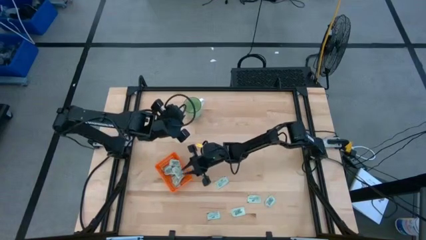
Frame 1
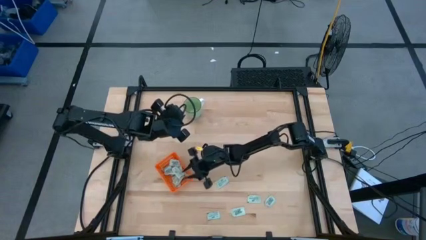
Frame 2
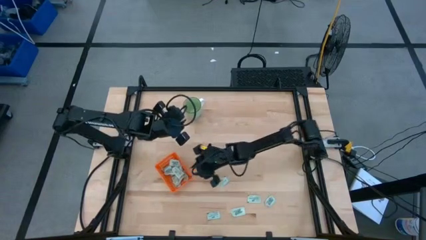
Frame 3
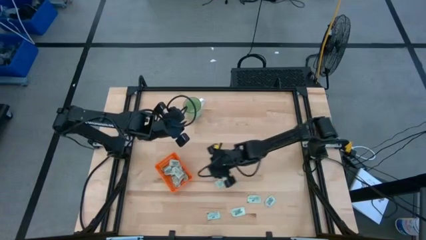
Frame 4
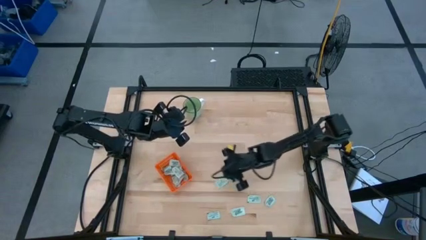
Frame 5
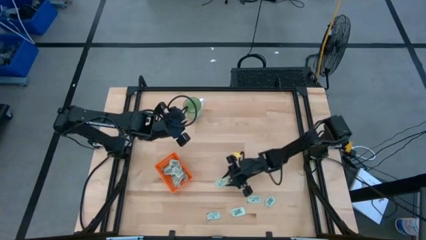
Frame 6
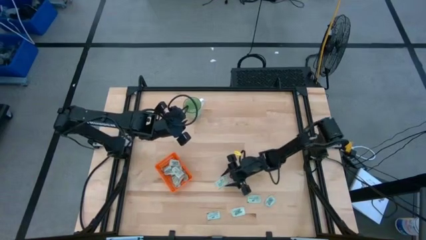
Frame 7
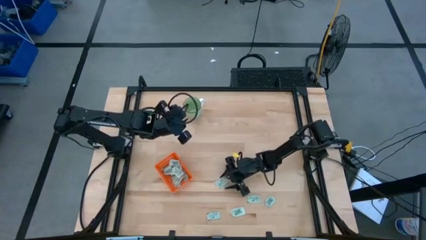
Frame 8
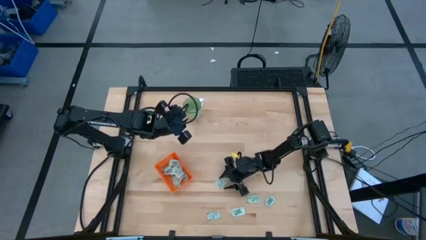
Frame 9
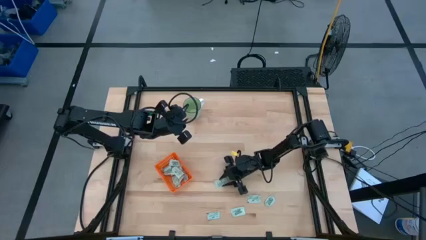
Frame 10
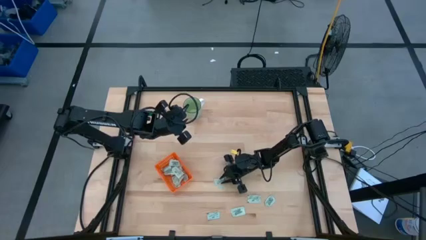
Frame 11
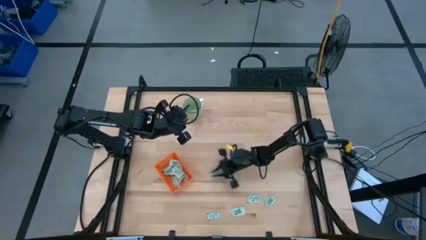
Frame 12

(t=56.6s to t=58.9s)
Task: Pick and place Stevia / Truvia into bins
Put the stevia packet into the orange basket

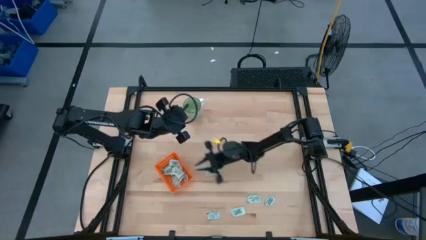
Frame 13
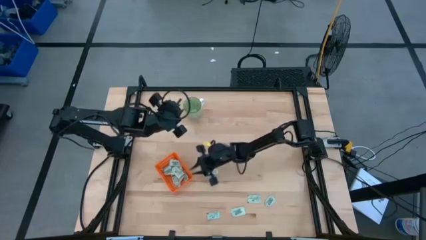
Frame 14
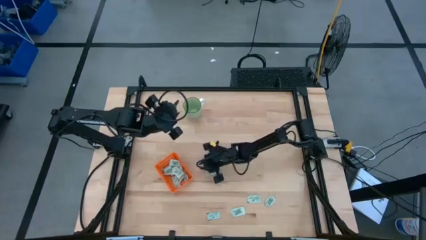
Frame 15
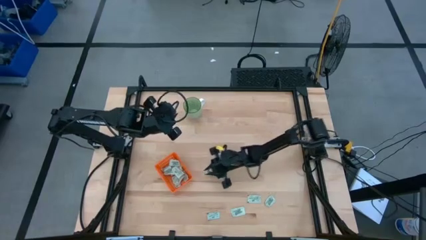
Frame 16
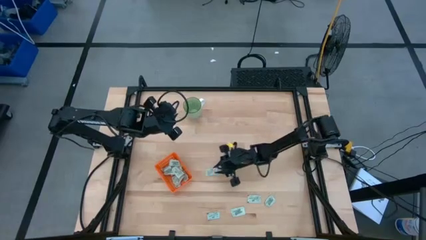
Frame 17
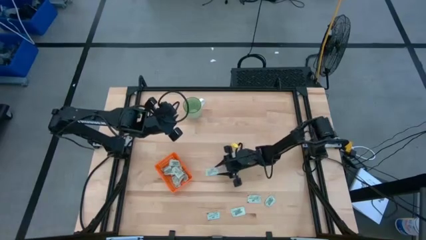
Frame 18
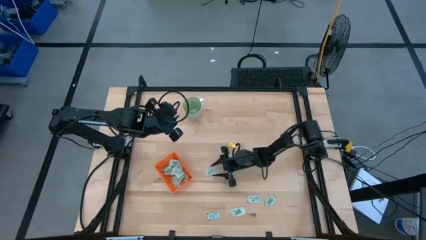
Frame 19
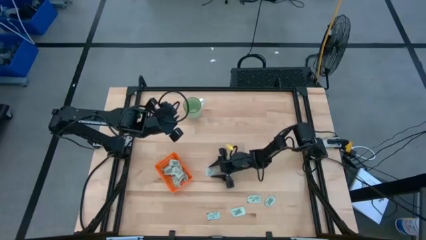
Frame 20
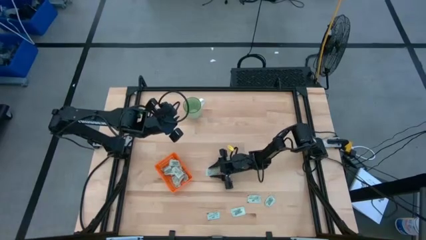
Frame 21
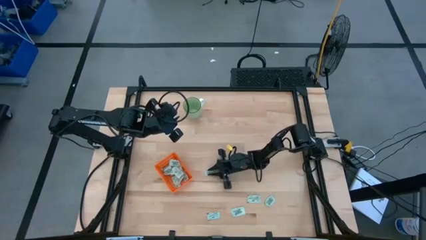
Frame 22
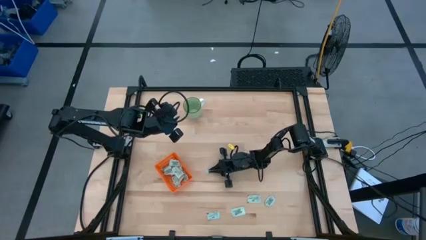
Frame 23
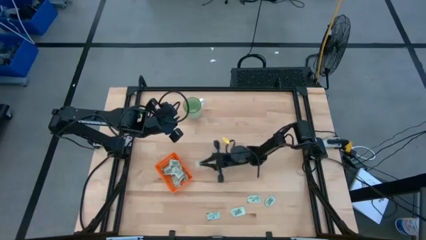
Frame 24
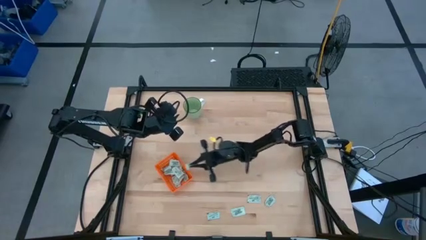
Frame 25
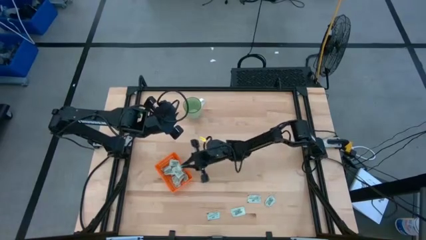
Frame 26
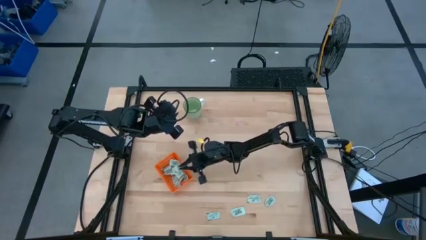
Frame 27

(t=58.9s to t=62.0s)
Put the stevia packet into the orange basket

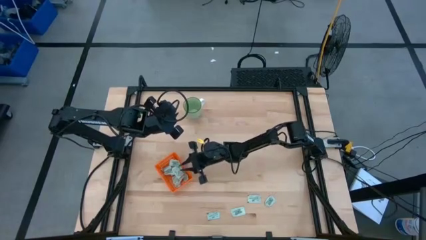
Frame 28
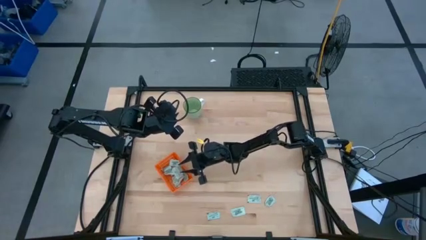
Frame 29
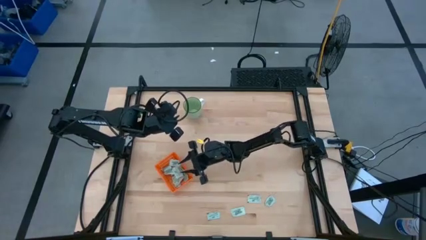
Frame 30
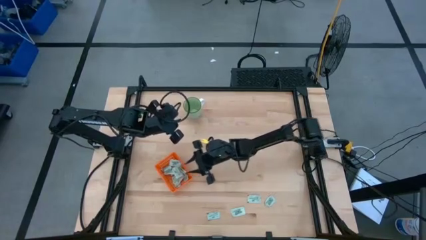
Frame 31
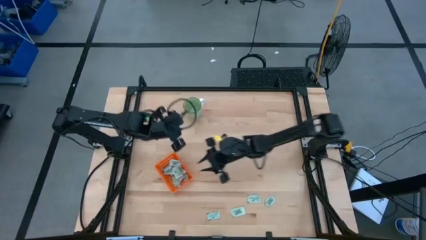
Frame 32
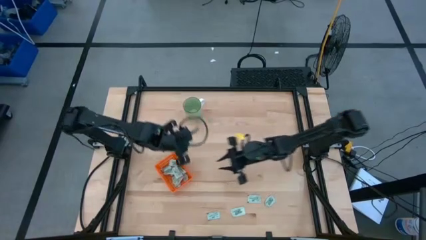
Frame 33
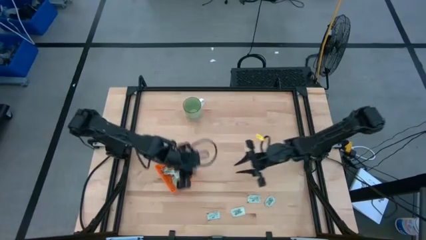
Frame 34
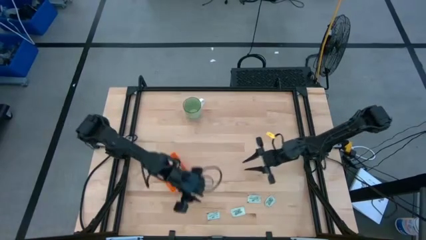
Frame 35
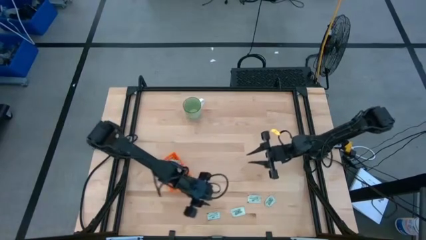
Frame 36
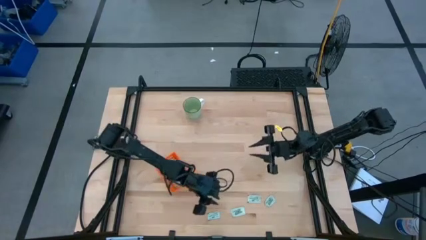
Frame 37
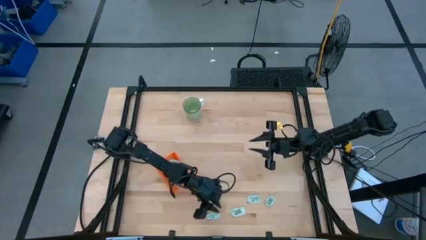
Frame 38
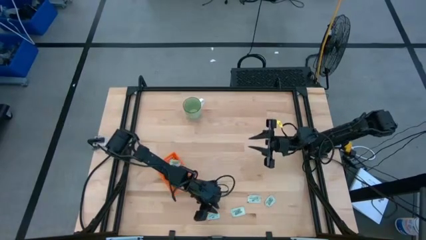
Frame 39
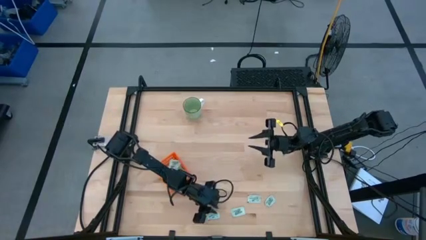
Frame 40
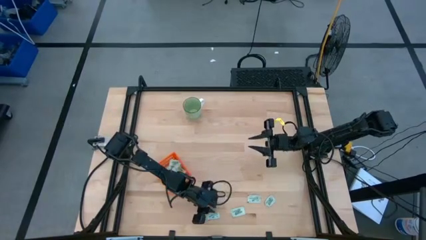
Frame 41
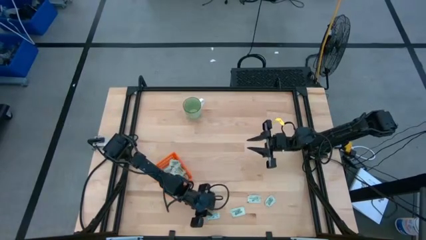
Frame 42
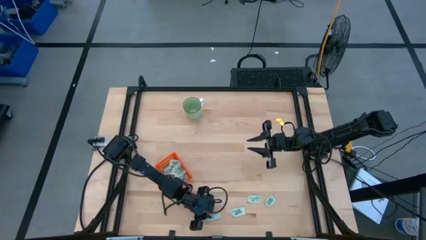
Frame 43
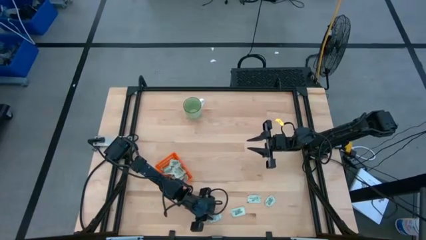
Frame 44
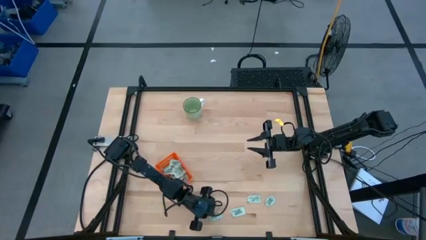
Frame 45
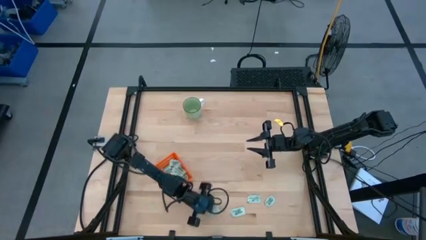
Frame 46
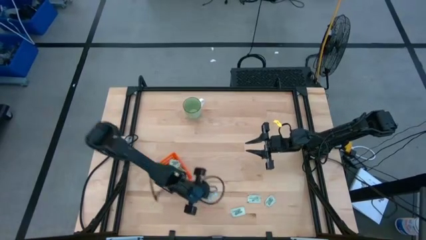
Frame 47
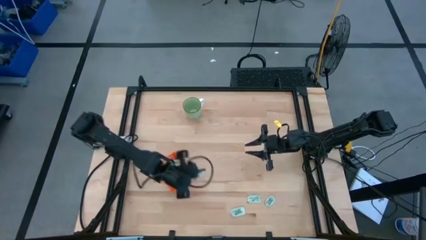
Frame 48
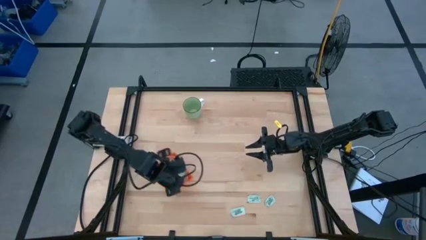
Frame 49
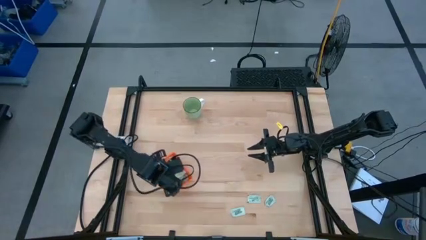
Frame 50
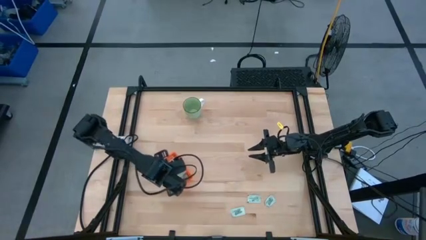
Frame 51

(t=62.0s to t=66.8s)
Put the stevia packet into the orange basket

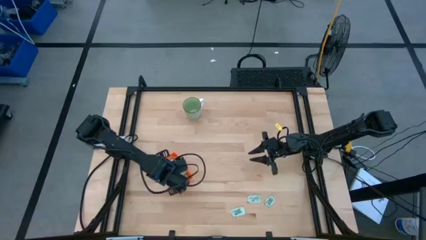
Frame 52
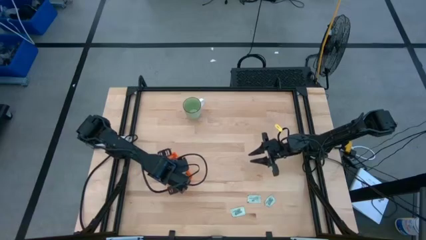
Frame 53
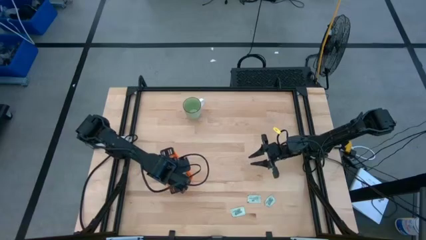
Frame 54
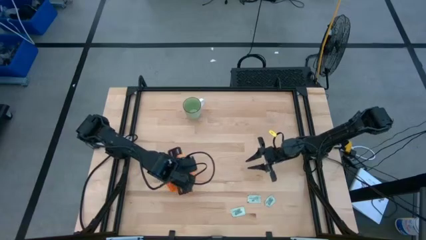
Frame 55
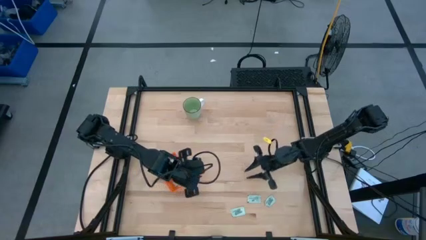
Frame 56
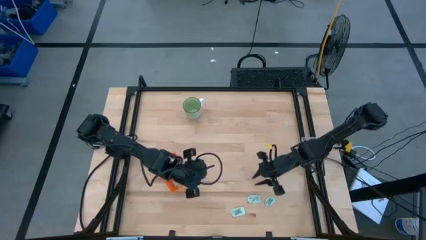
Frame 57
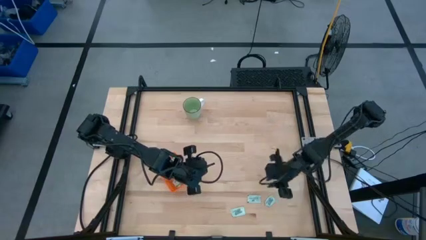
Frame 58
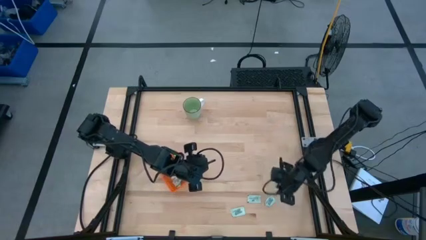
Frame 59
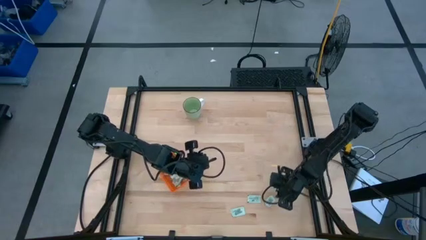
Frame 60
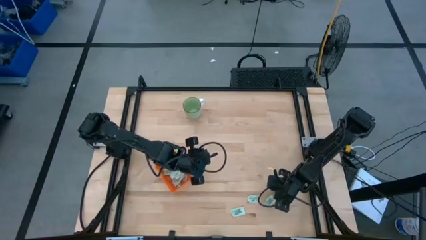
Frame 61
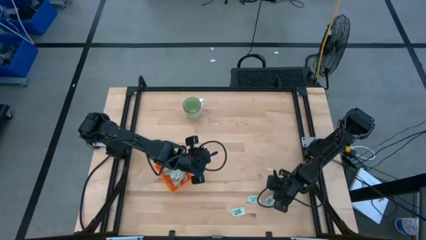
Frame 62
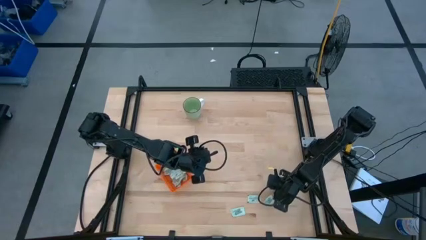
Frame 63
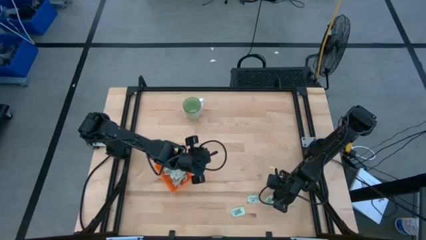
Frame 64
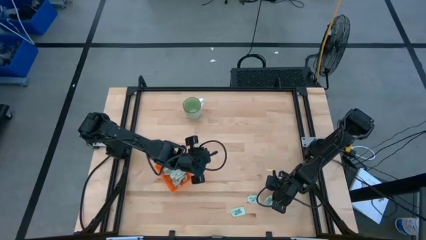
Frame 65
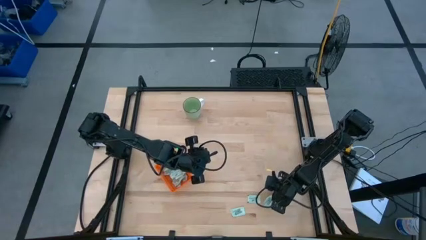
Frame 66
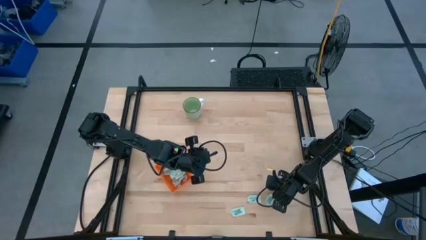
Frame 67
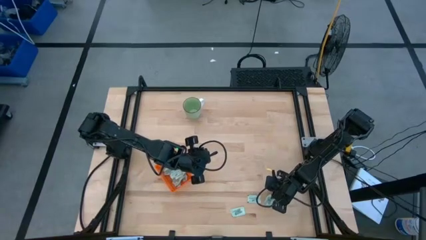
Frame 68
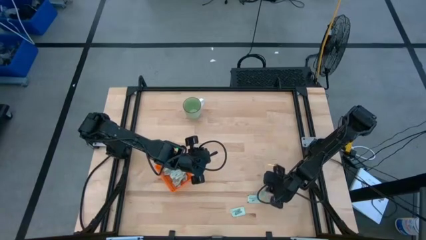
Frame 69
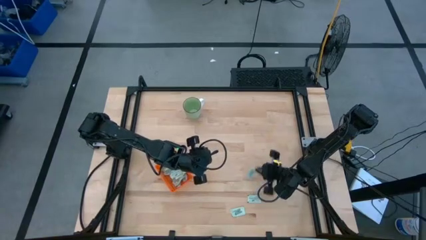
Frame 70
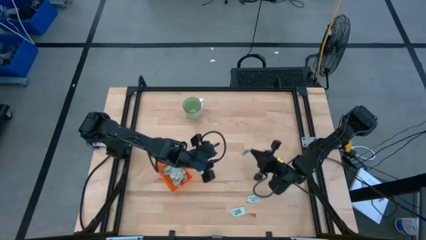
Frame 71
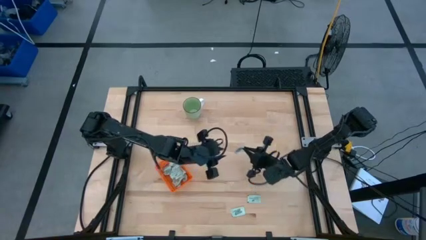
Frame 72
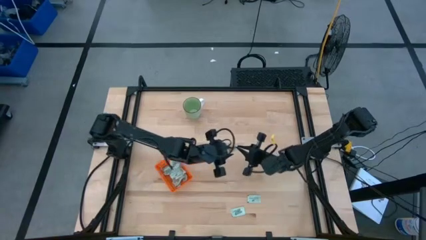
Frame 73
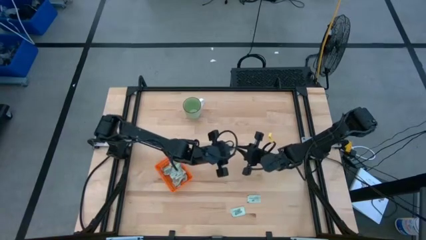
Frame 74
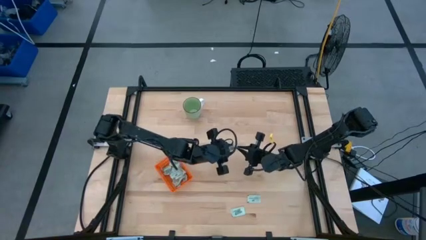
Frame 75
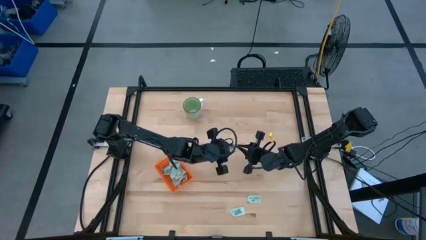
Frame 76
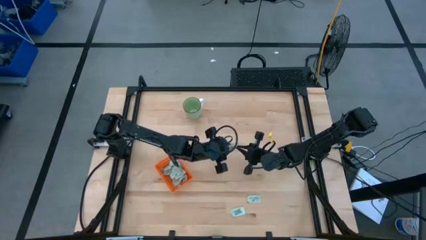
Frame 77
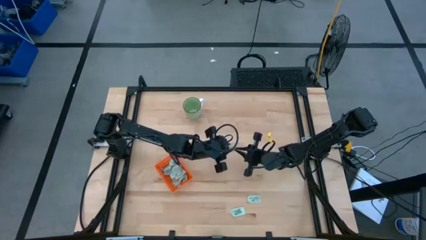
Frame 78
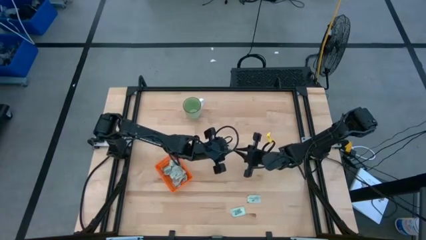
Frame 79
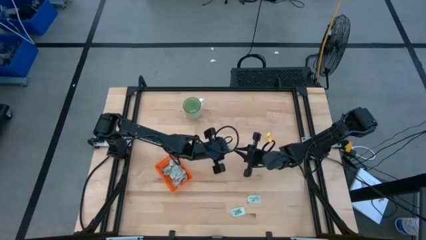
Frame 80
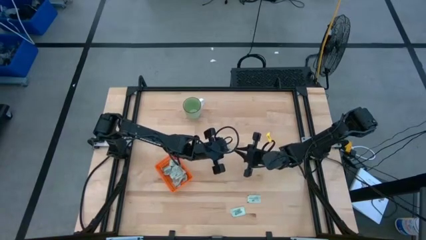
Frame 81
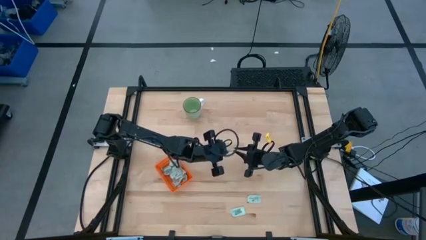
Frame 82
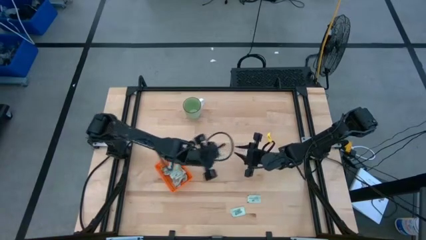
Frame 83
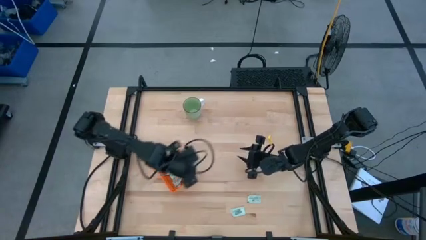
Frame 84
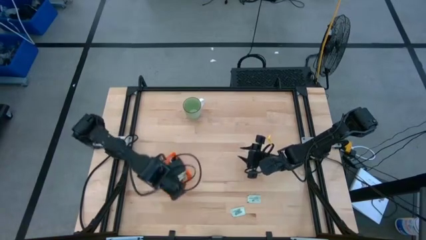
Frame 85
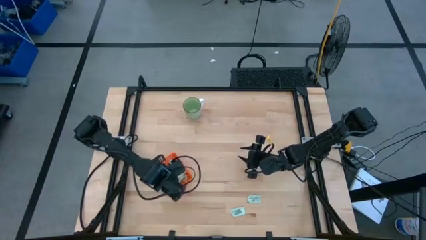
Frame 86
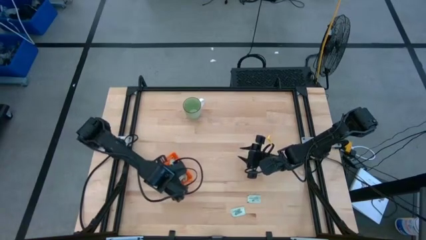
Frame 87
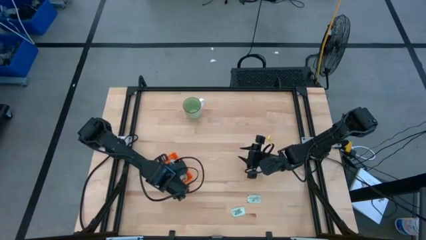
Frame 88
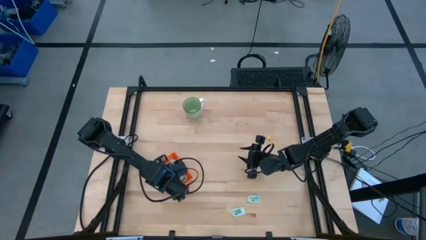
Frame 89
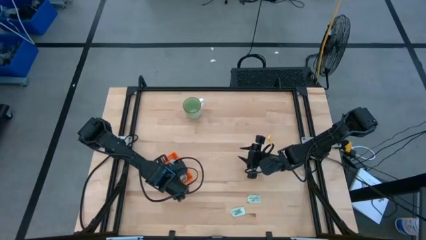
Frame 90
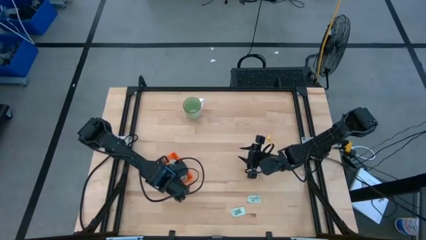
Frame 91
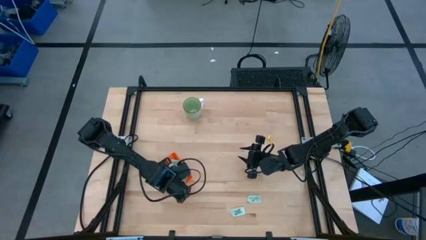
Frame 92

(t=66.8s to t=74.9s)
Put the stevia packet into the orange basket
